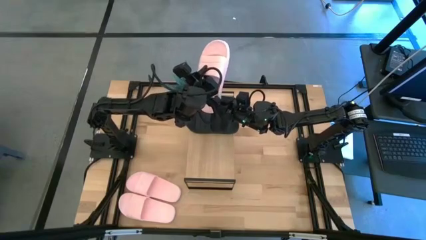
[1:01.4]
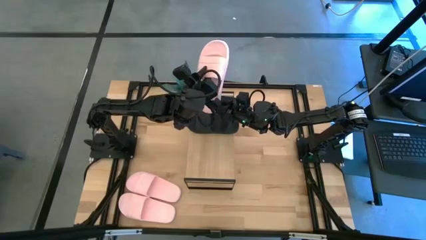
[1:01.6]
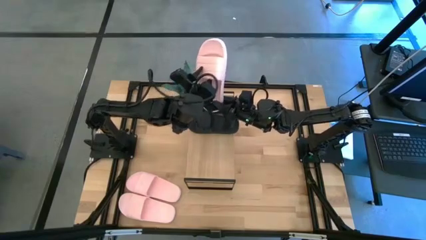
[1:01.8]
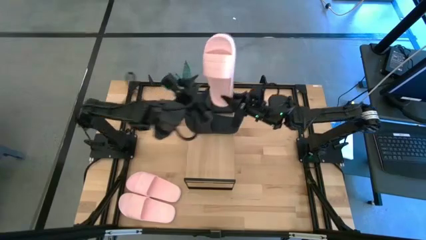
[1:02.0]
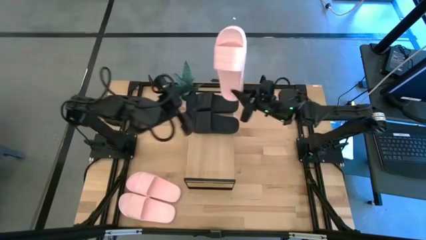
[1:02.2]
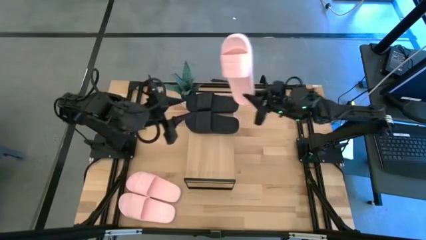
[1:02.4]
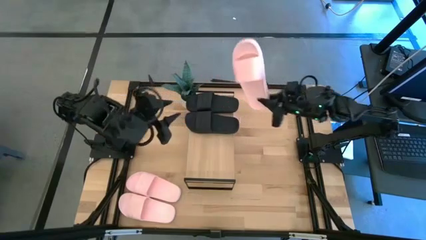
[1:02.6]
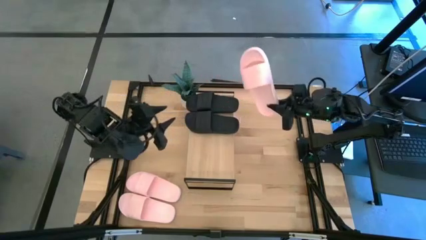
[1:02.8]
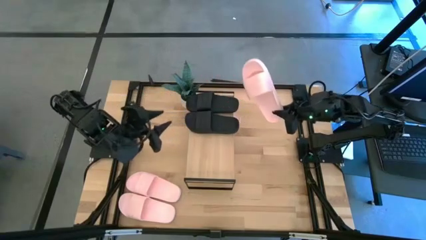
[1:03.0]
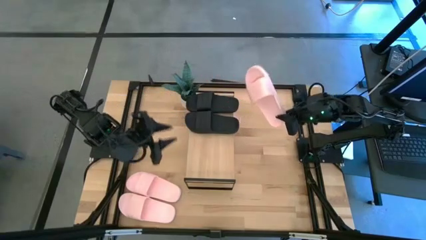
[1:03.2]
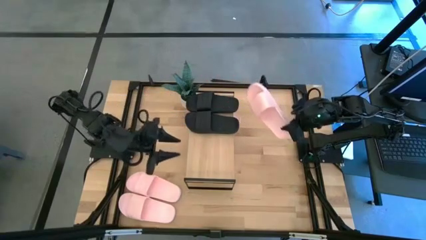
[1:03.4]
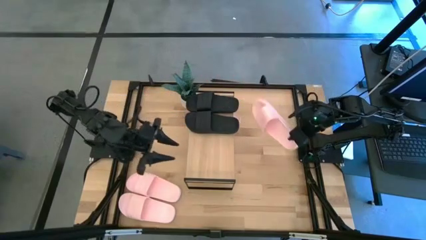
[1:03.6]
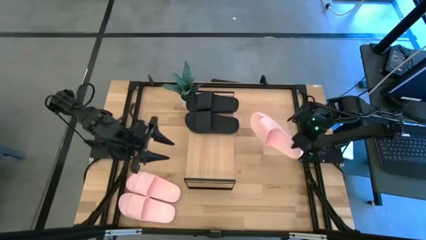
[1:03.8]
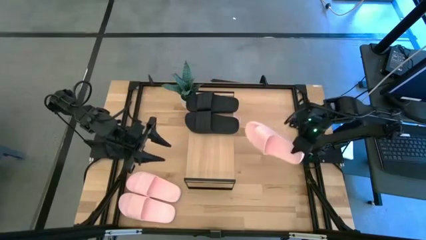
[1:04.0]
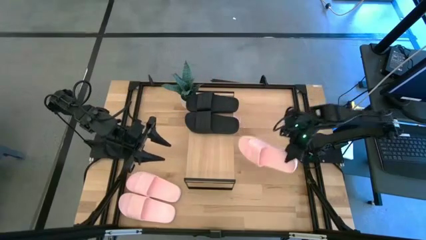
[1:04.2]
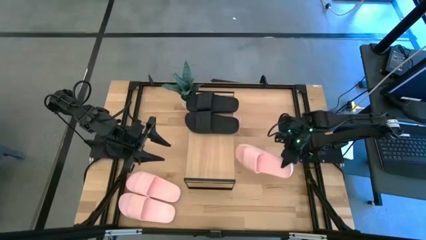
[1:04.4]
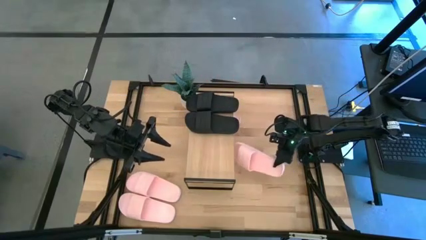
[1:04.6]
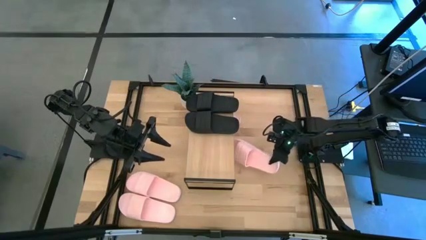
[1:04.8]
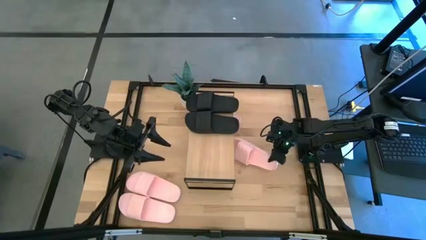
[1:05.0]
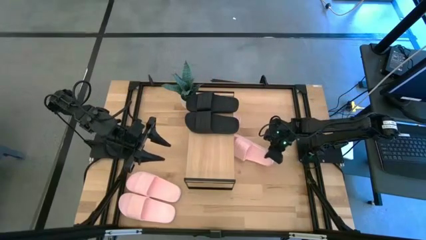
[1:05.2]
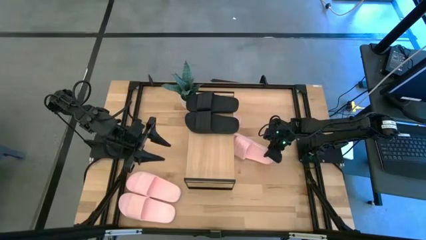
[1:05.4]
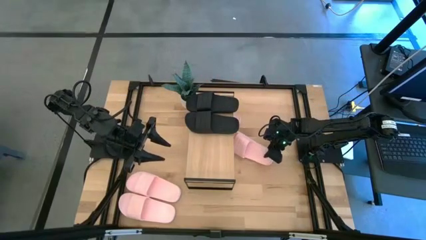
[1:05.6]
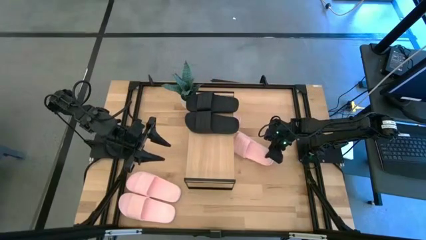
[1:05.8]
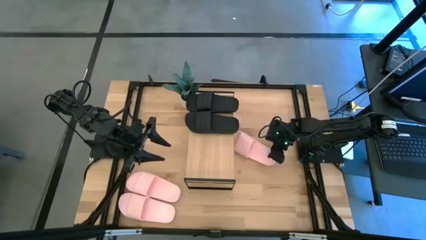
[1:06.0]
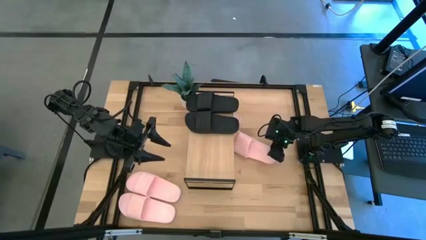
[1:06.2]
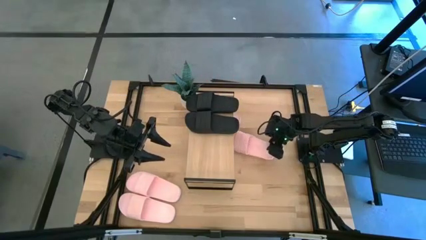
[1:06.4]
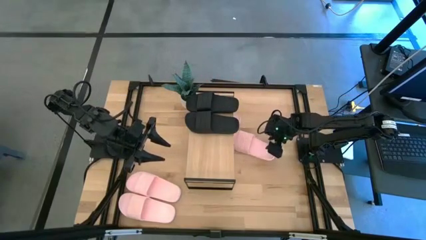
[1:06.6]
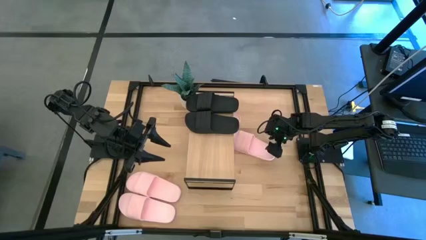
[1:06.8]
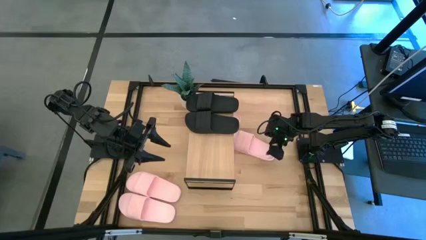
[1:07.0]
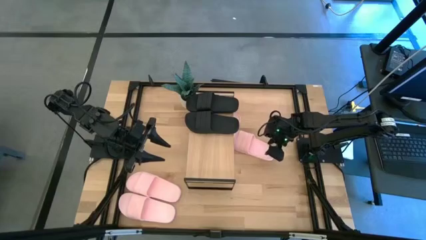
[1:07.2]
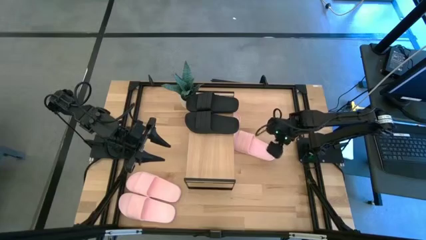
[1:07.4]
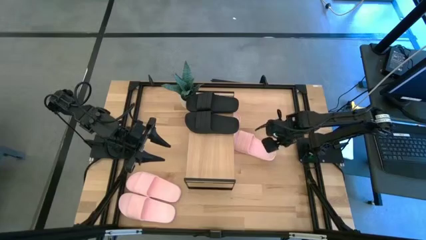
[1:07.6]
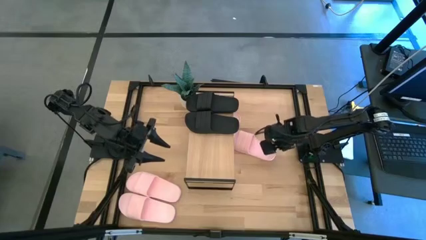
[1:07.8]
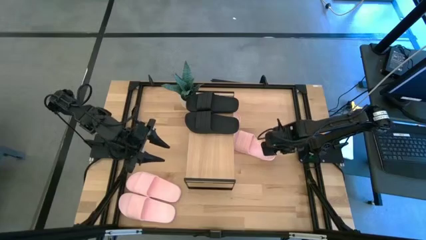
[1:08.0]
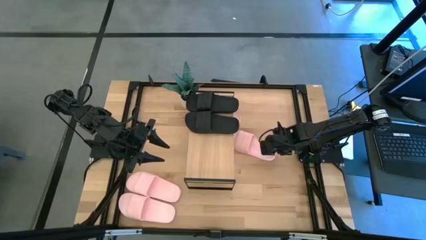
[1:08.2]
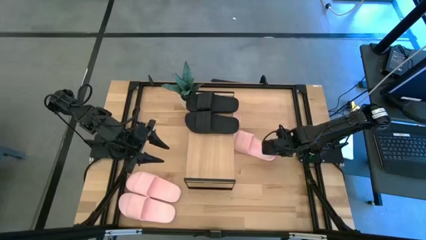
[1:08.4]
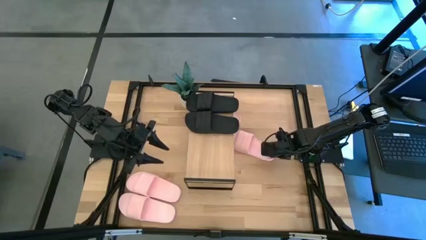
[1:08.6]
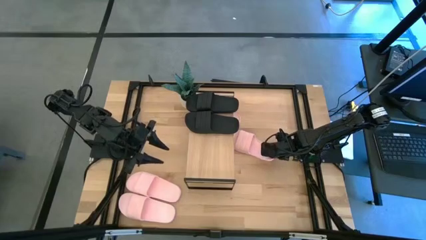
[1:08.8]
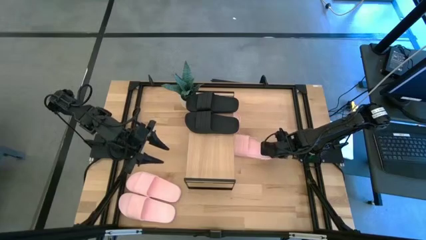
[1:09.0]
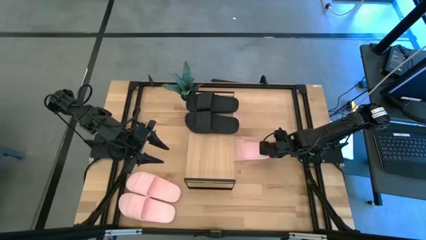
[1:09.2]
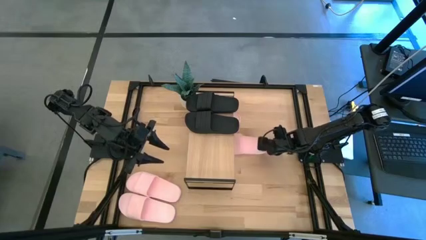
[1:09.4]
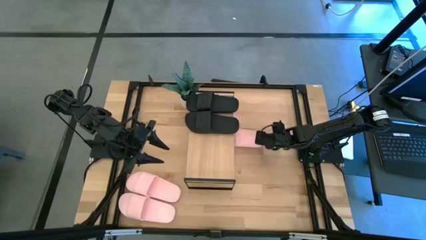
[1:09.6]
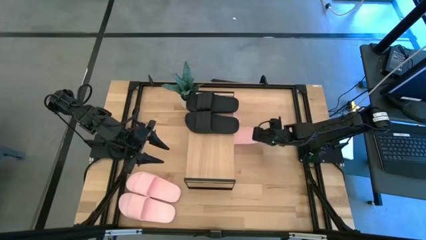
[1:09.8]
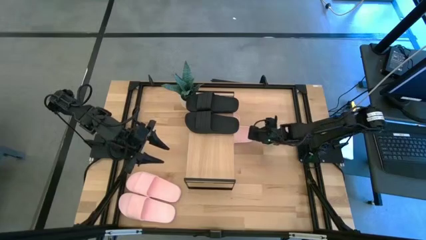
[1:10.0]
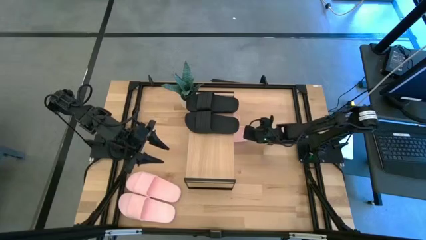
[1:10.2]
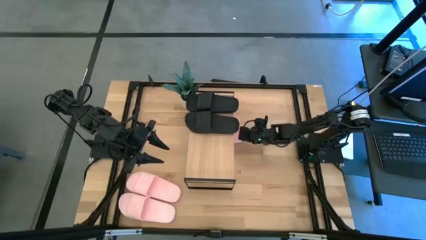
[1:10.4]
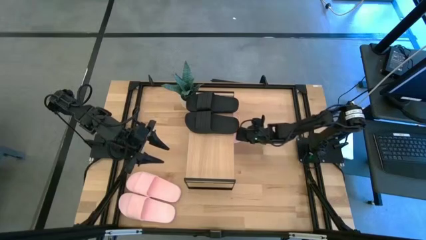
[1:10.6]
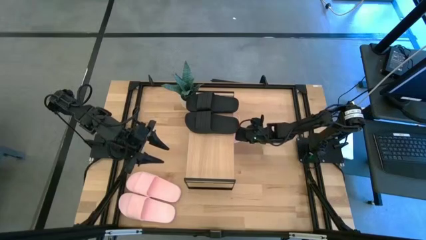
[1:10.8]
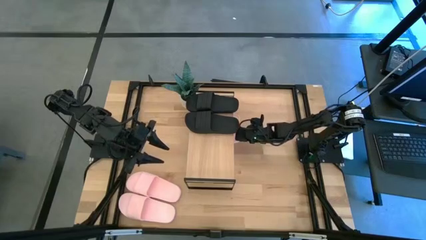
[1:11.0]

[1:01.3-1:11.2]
Task: Pick and place slides into the shelf
Put the pink slide under the shelf

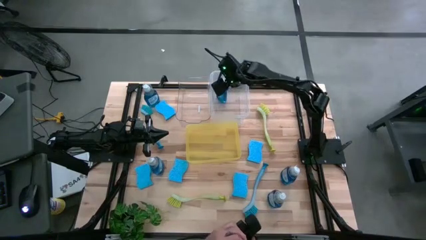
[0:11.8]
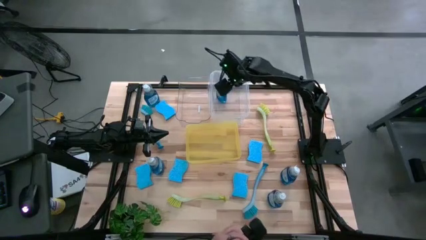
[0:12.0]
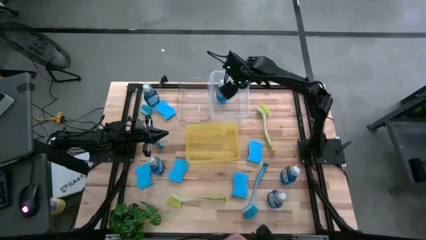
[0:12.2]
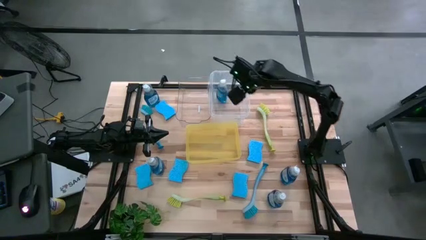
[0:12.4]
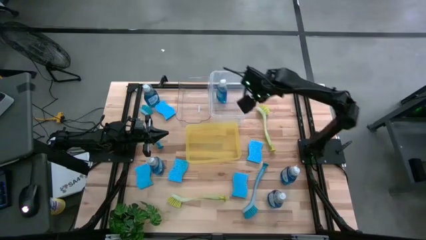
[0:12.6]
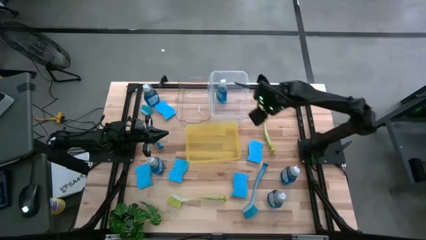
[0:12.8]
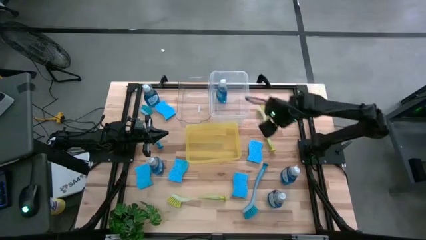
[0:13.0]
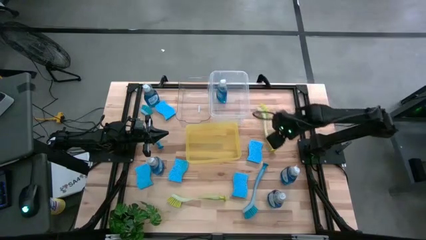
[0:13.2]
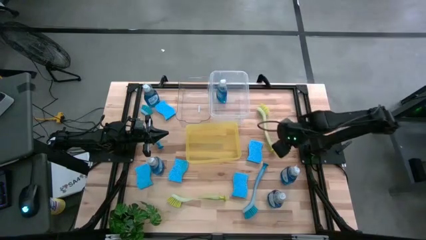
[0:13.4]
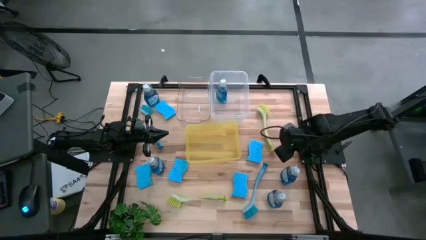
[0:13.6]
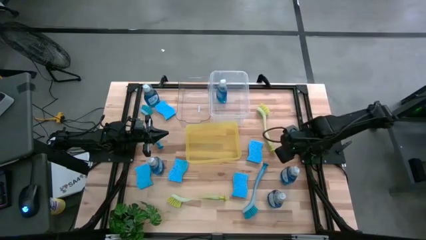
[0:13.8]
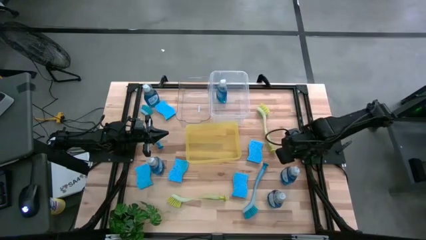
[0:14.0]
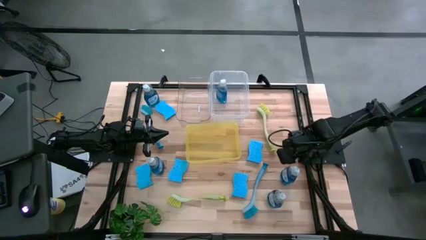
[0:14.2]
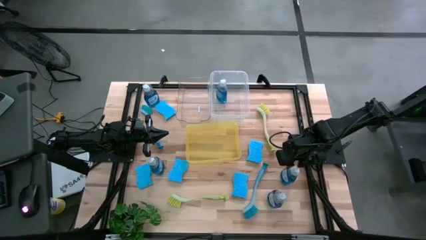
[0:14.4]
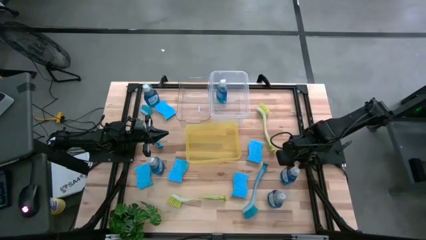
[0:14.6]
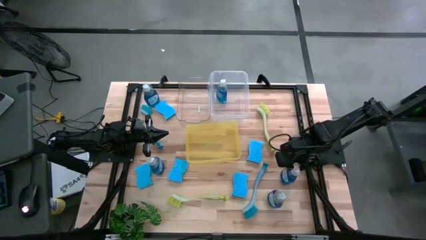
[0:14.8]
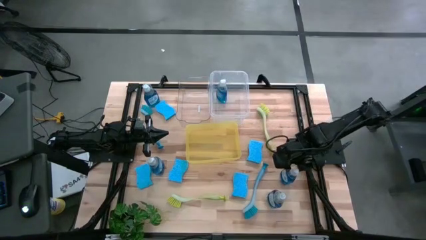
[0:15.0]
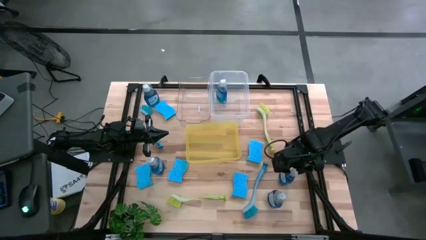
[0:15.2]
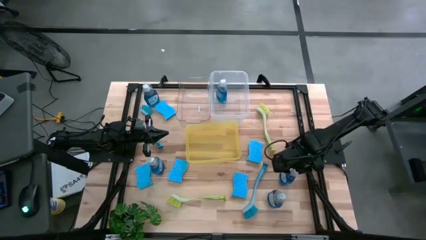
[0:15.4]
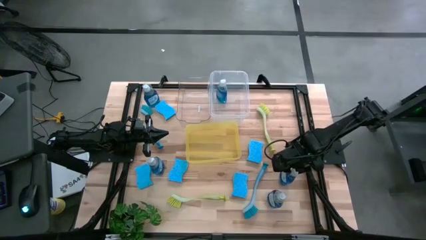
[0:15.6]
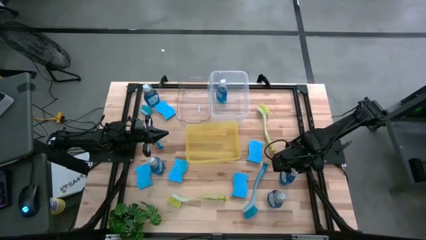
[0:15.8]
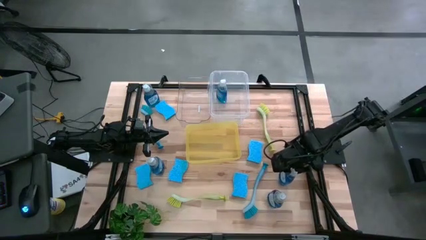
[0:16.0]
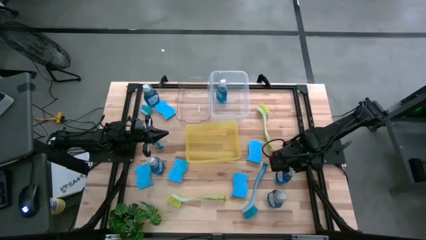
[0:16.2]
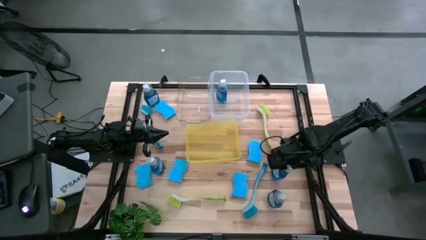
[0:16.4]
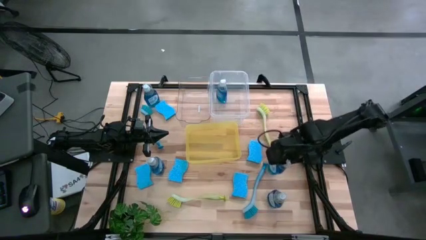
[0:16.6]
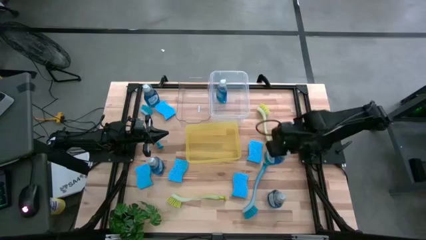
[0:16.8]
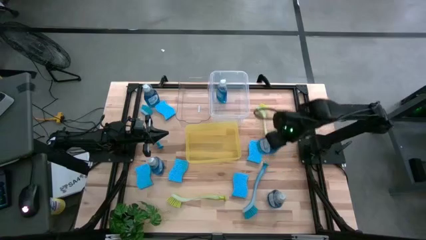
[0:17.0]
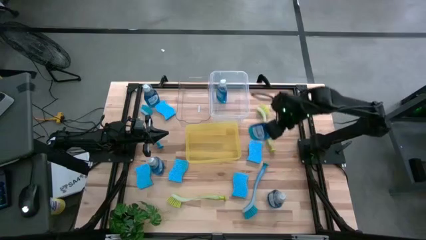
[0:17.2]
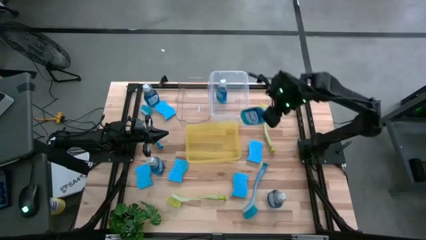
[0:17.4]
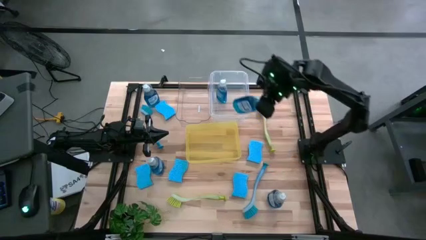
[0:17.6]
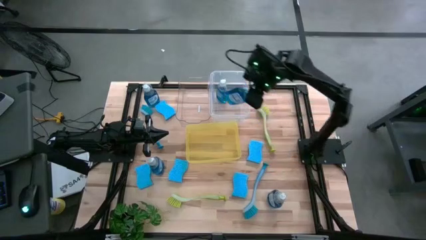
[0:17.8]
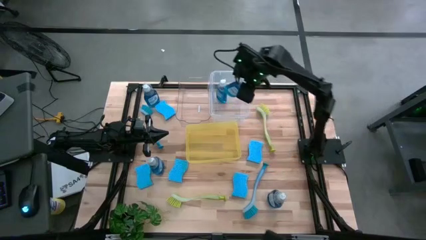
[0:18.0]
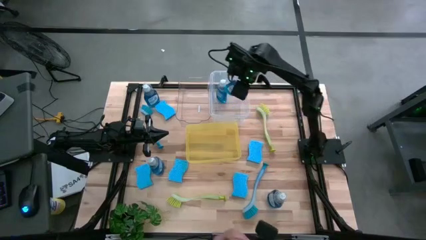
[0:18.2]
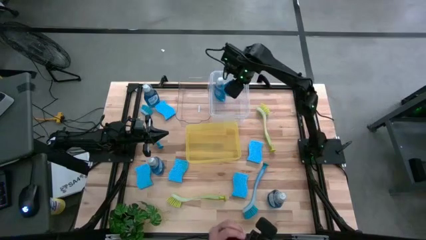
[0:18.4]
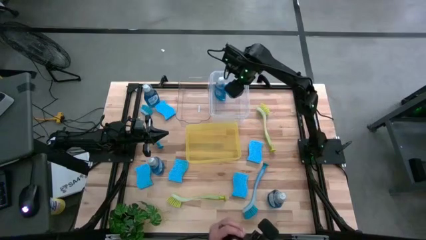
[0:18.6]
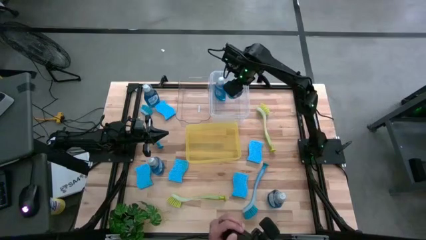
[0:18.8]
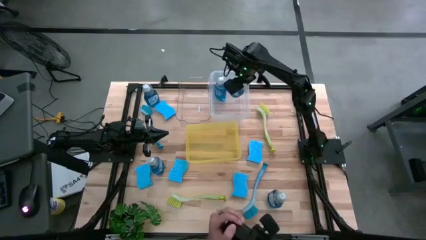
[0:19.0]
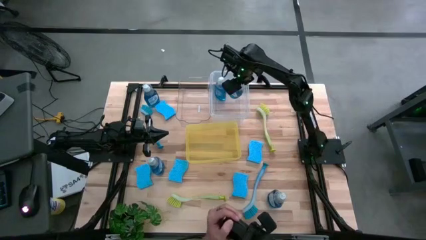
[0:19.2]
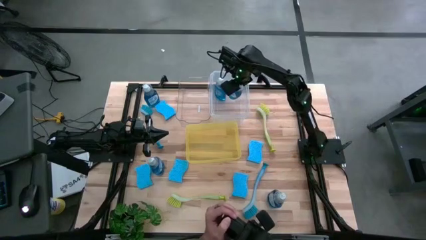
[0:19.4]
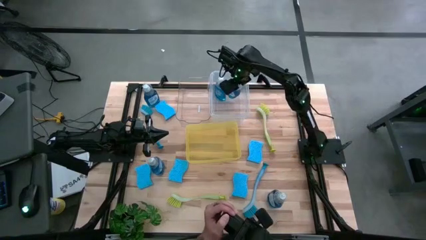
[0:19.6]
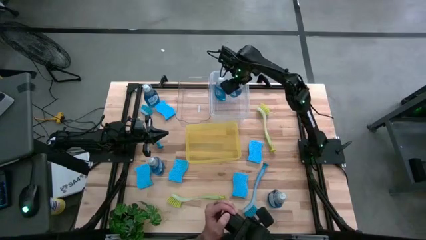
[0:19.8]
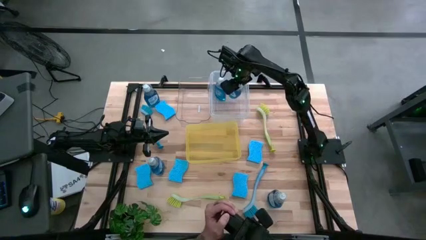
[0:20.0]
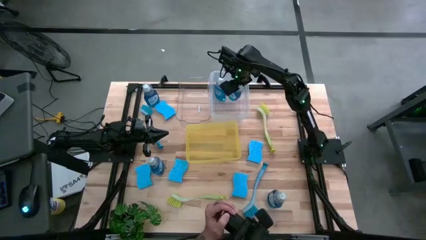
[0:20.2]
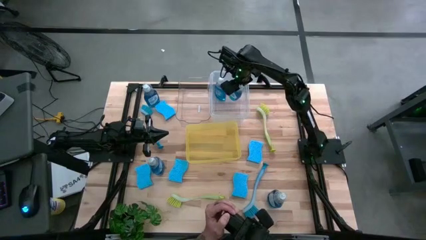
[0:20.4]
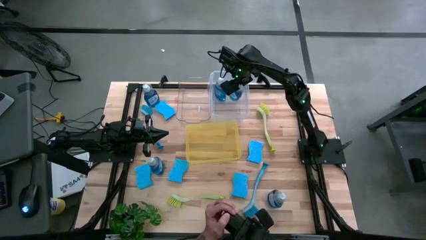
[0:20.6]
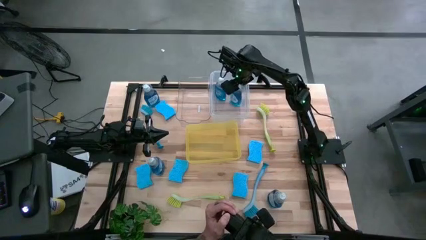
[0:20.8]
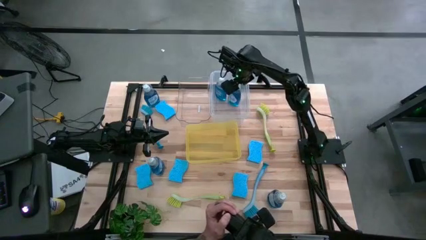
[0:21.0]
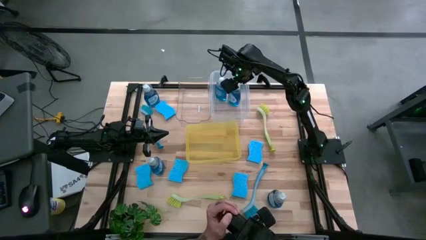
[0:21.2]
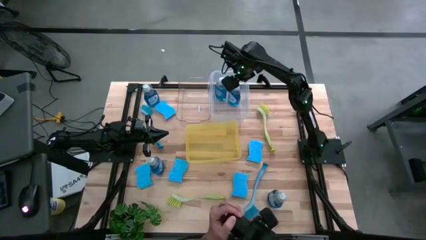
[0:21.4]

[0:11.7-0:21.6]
Task: Pick & Place Kitchen Sink Supplies
Put the blue dishwasher liquid into the white bin
